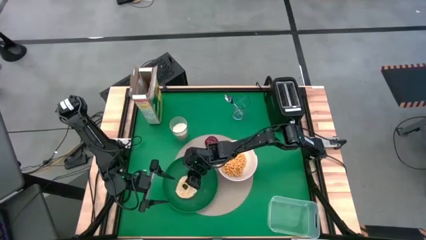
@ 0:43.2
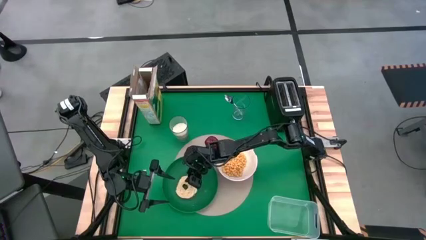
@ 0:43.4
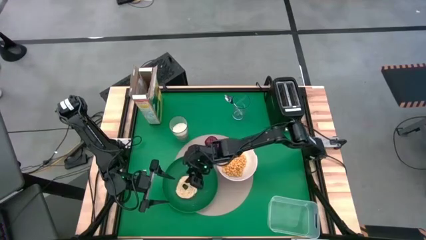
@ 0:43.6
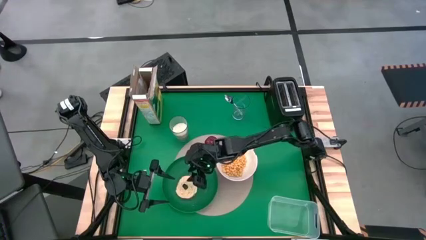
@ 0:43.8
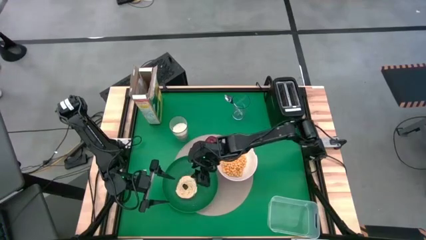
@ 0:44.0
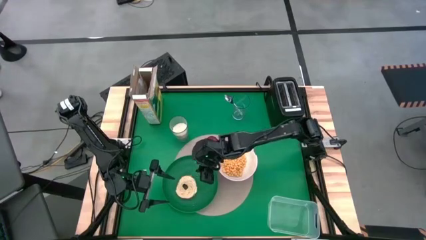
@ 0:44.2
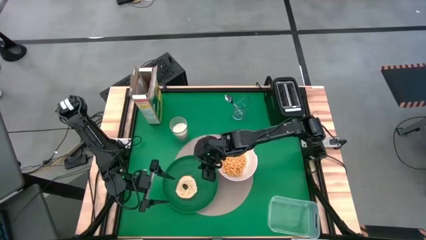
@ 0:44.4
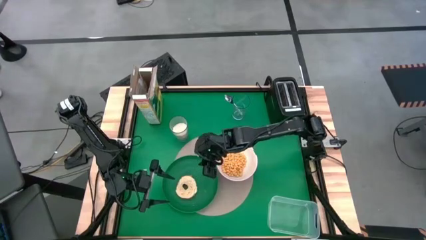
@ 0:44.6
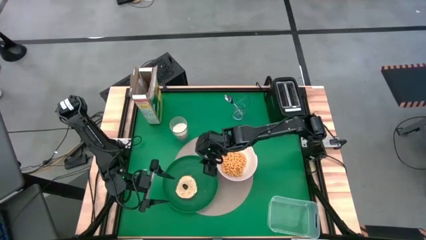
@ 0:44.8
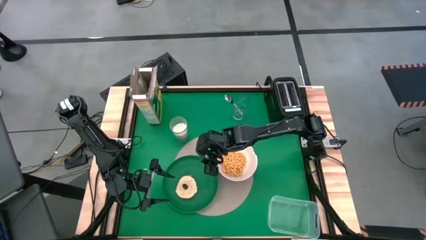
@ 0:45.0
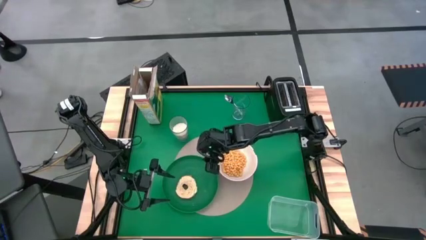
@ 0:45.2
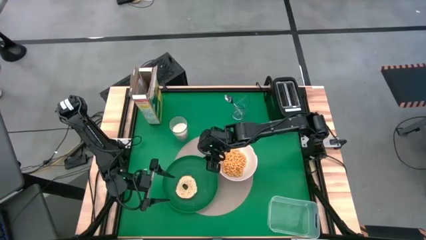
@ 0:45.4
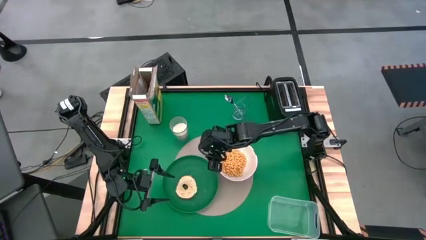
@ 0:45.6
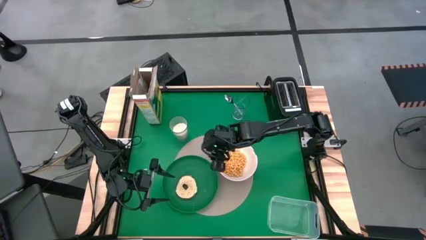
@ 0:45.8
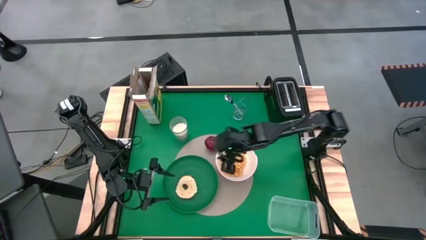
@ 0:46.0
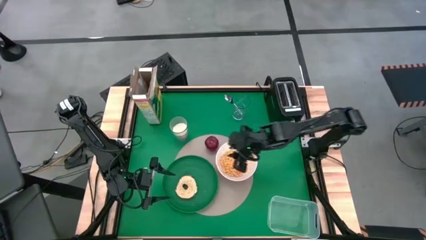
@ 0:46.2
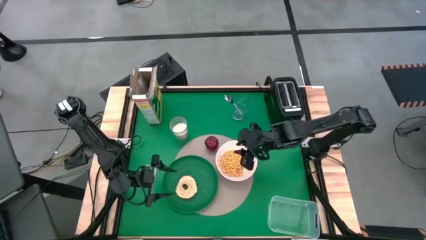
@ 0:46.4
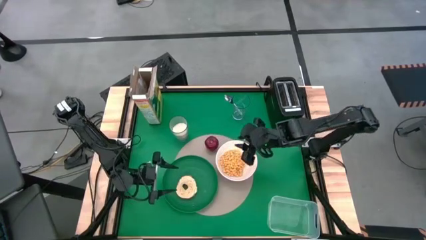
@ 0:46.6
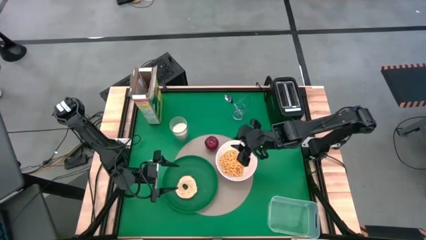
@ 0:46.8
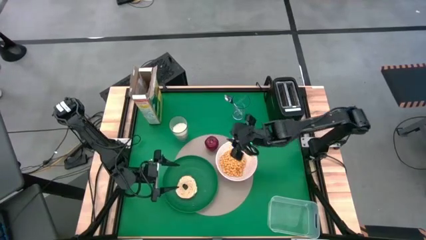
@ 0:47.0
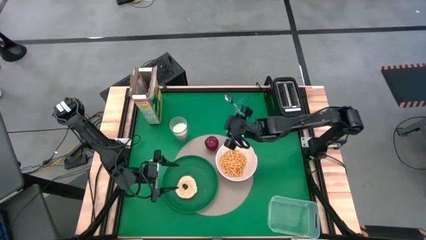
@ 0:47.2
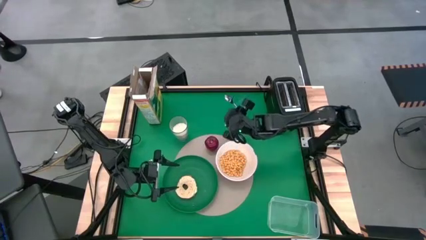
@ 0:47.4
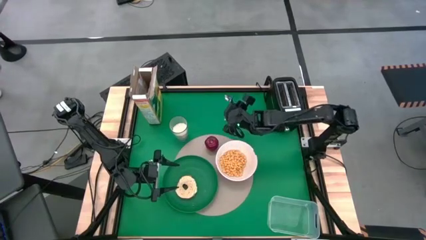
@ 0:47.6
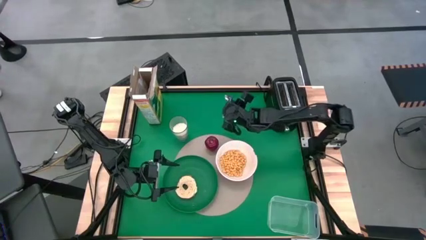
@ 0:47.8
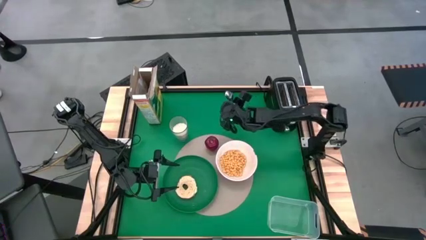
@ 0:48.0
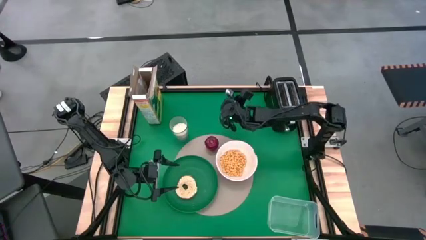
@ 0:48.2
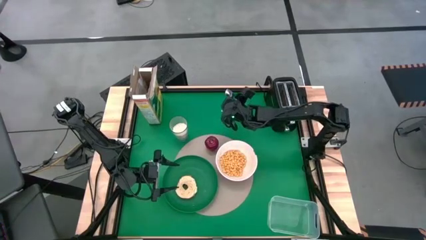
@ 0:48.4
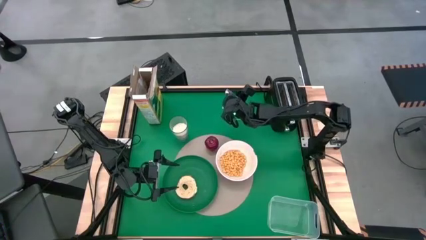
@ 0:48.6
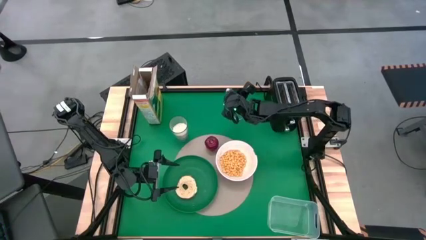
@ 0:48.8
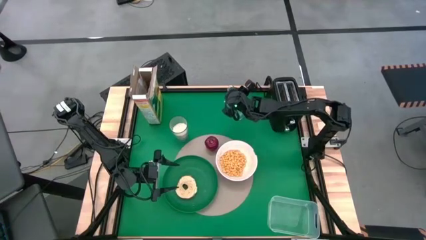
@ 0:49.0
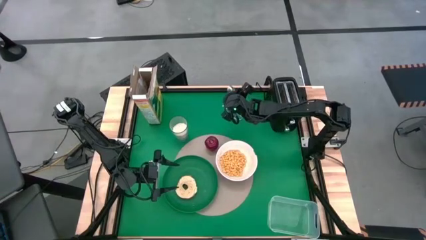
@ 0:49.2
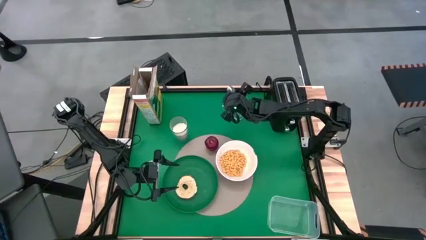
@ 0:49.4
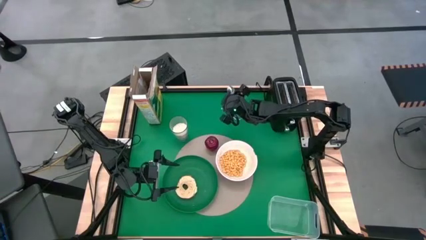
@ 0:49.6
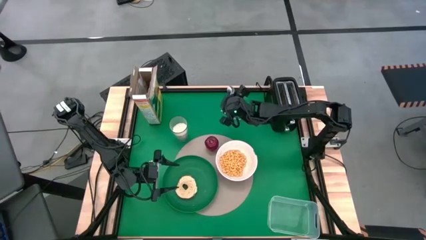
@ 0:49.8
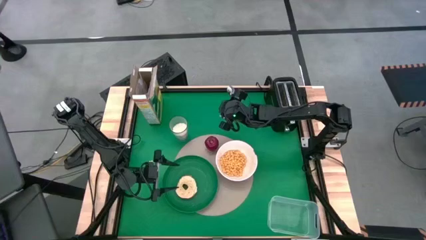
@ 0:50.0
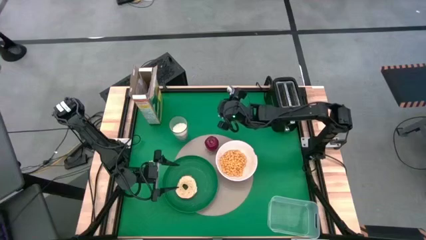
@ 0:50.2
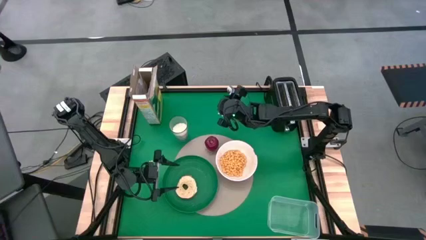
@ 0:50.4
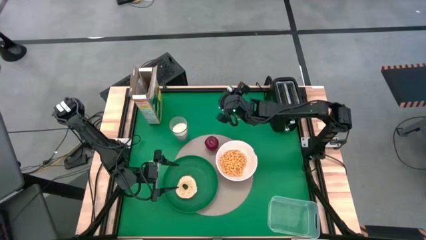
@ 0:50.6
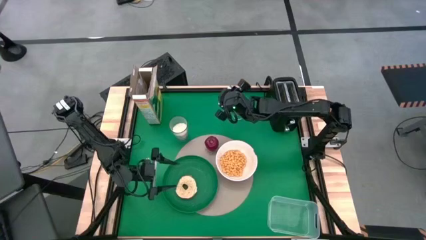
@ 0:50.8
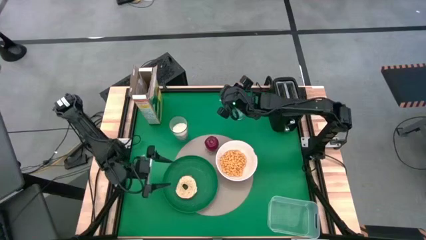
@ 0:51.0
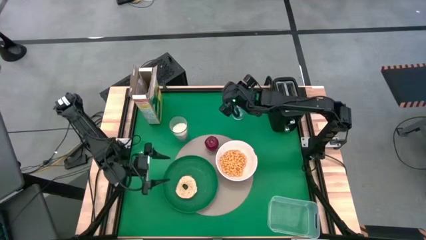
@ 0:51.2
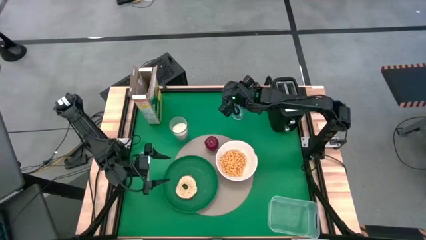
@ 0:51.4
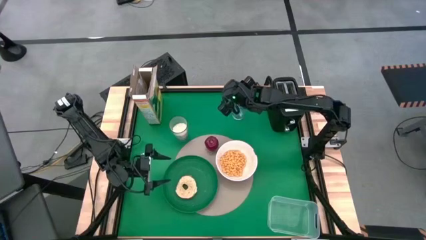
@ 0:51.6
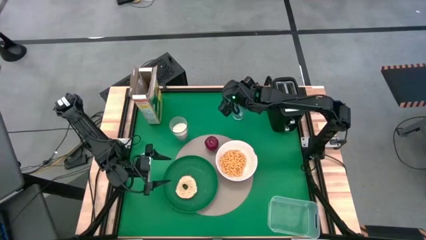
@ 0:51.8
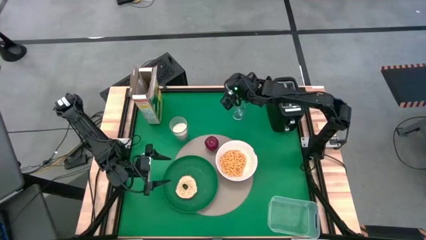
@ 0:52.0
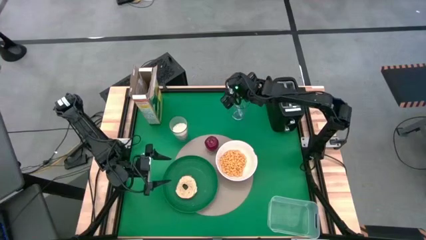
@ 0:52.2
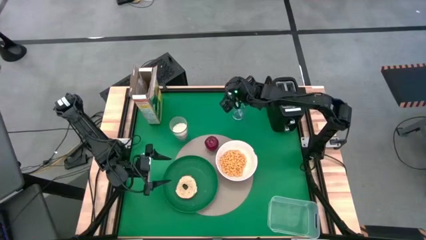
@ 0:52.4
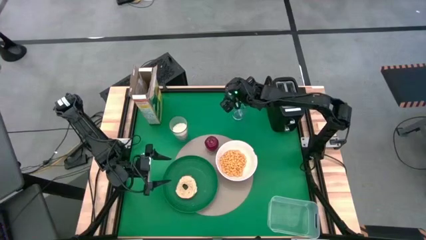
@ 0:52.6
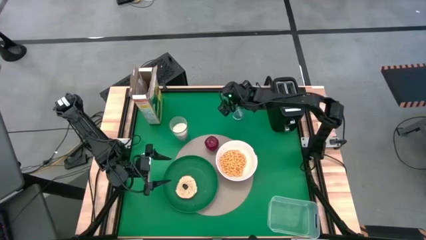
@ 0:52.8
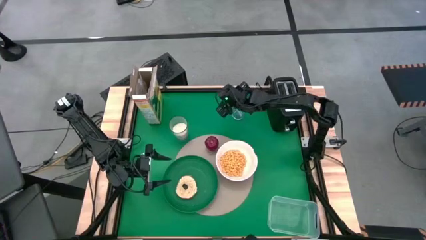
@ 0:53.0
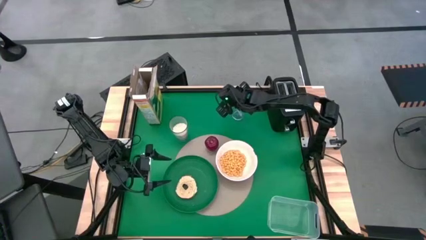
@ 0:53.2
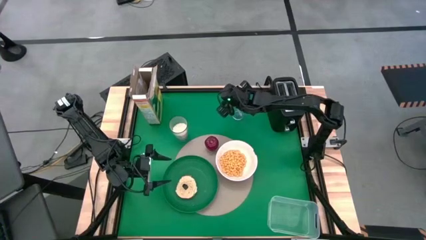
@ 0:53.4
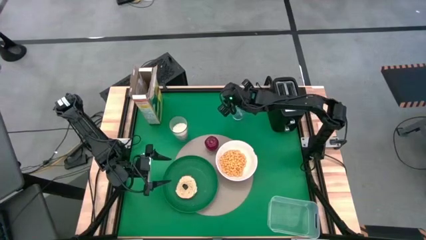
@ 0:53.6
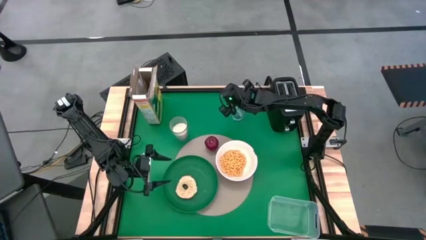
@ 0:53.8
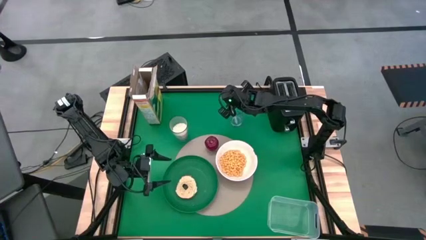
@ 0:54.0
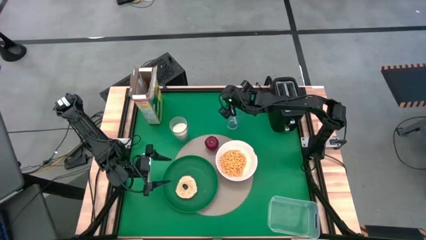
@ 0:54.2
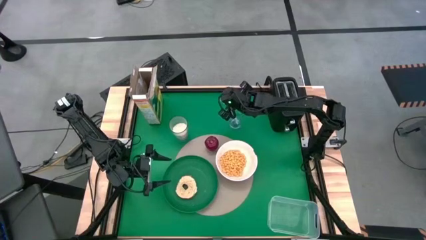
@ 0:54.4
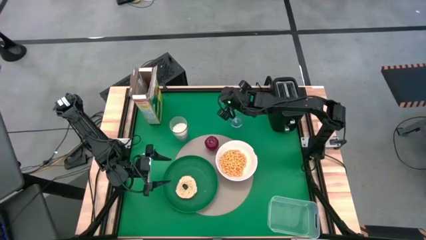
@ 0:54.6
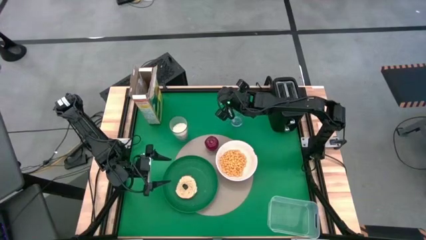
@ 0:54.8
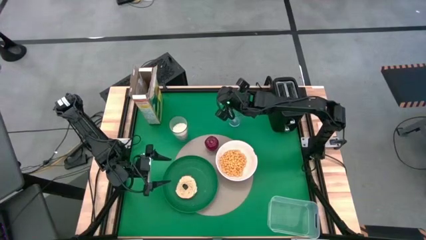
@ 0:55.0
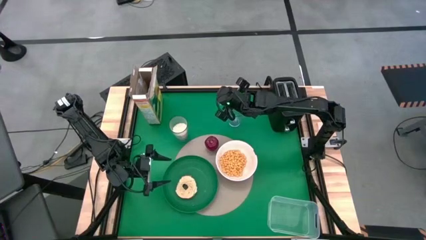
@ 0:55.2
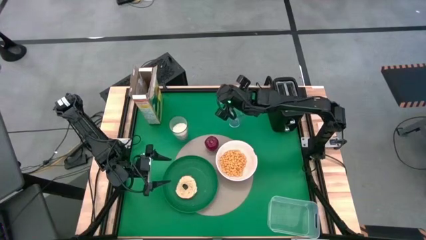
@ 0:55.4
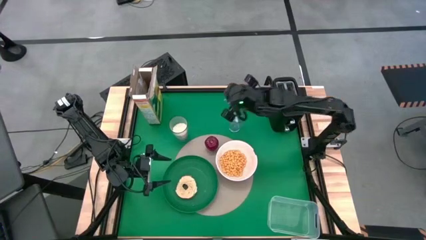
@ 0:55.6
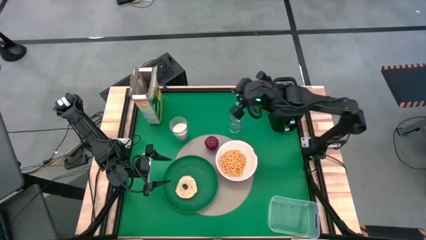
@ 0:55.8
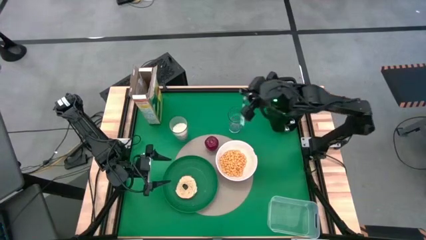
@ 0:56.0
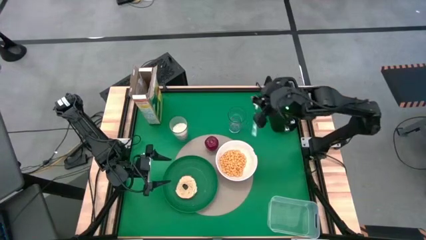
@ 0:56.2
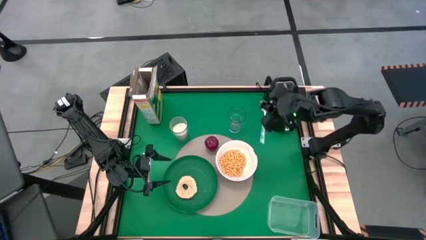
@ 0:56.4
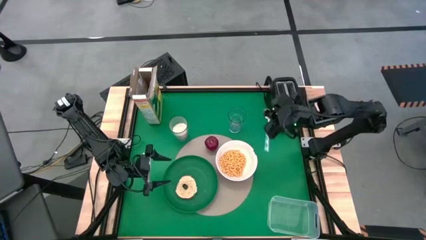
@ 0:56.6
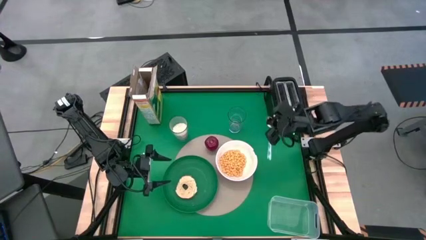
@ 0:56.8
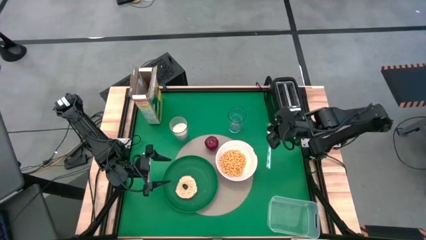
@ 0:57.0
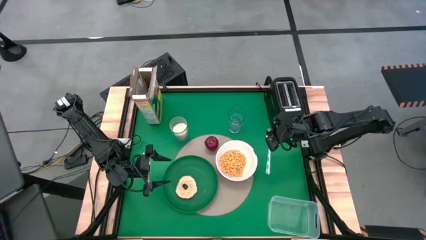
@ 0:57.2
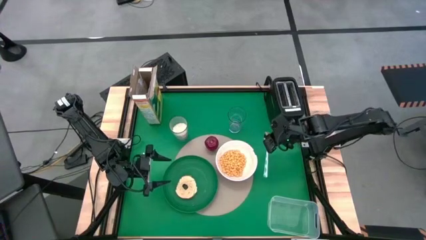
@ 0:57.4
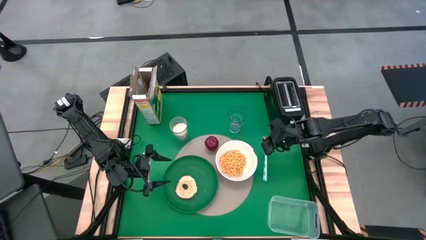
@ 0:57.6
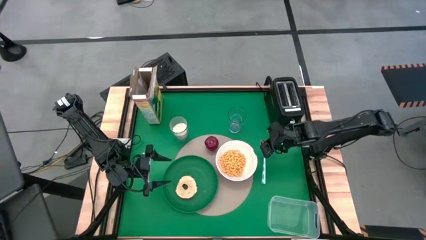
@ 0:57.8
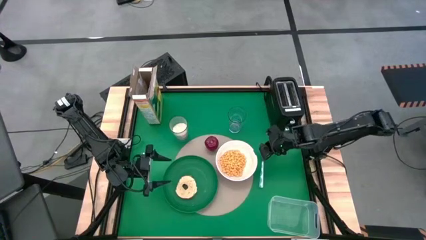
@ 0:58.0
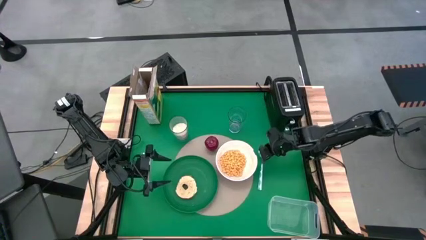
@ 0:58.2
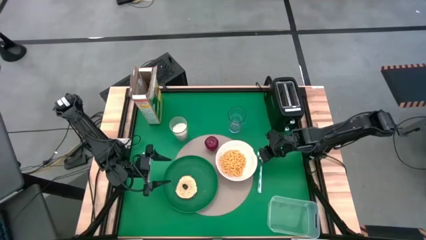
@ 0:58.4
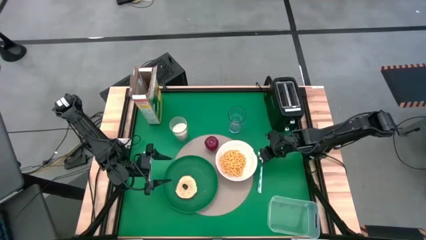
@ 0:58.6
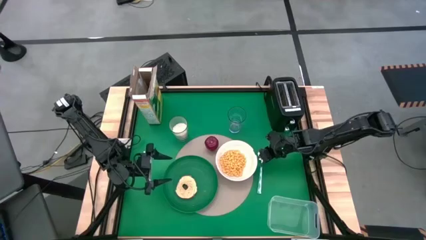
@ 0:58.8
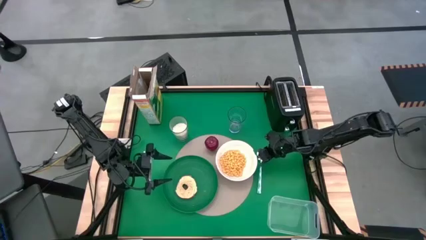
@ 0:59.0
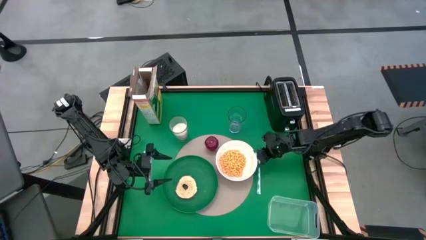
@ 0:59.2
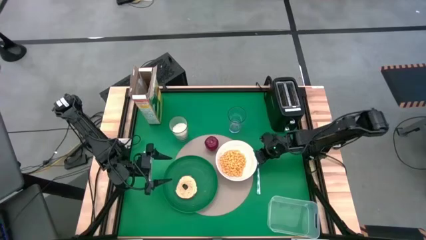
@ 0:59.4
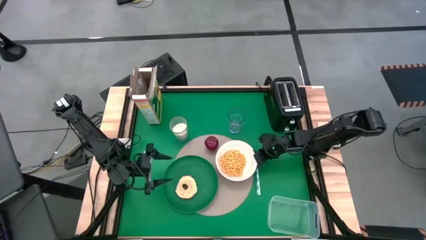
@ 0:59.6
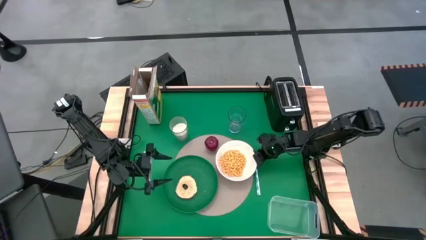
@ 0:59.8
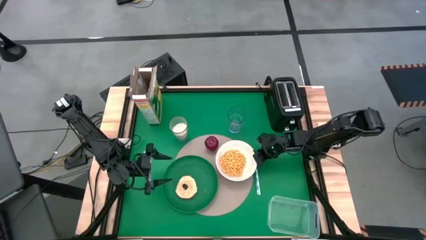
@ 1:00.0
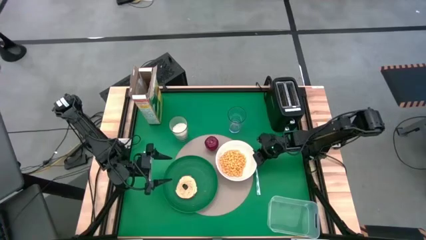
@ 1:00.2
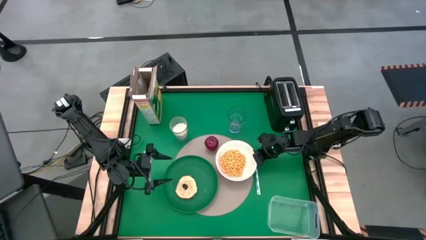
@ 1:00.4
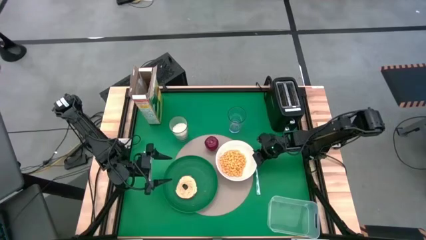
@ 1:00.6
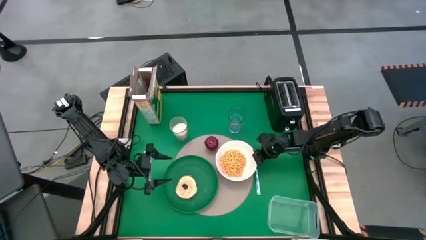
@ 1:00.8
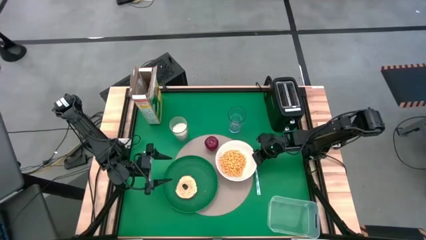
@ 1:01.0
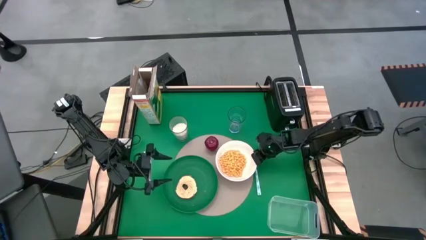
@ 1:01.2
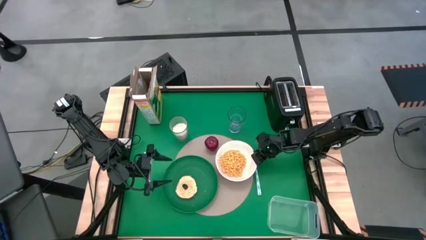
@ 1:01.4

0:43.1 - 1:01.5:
Task: Arrange a breakfast setting
Put the blue spoon to the right of the white bowl
